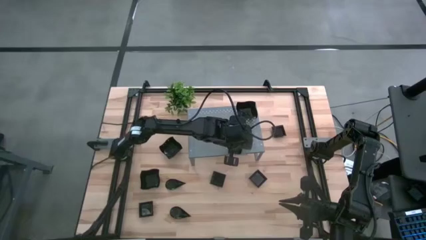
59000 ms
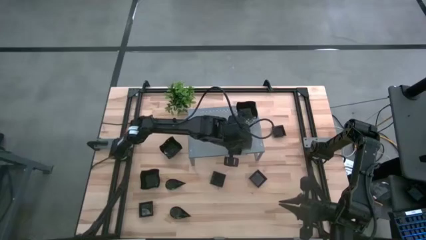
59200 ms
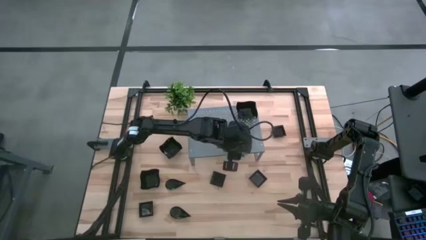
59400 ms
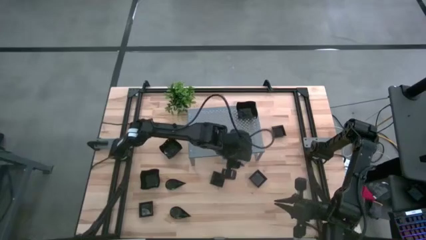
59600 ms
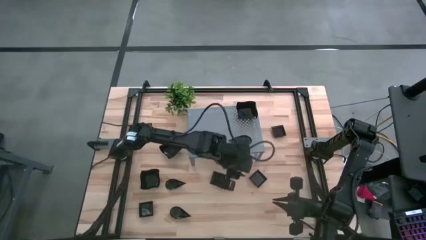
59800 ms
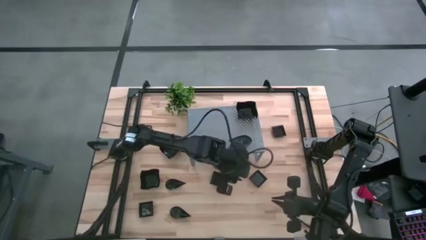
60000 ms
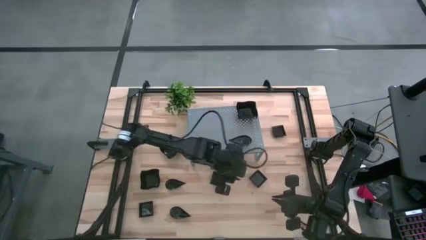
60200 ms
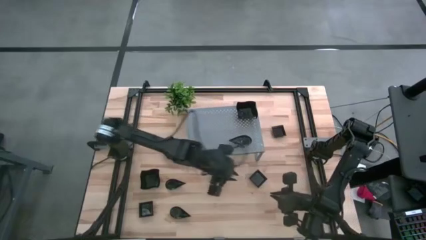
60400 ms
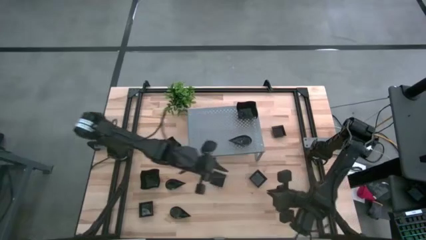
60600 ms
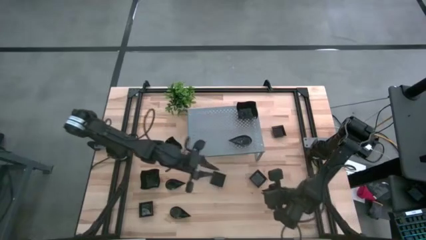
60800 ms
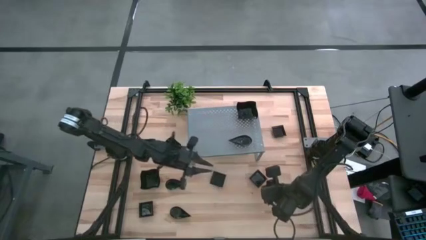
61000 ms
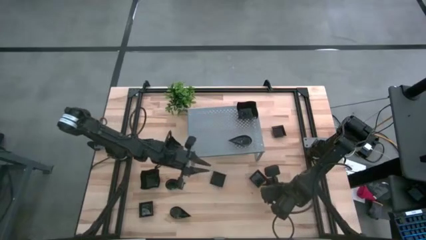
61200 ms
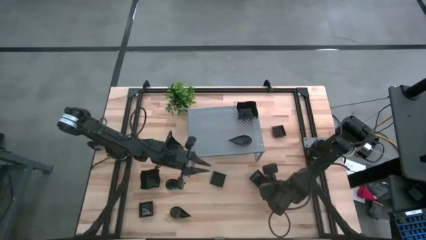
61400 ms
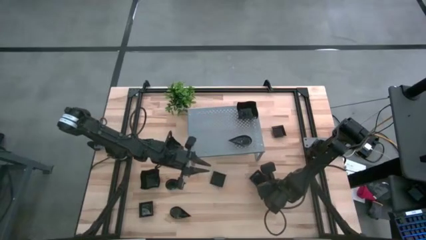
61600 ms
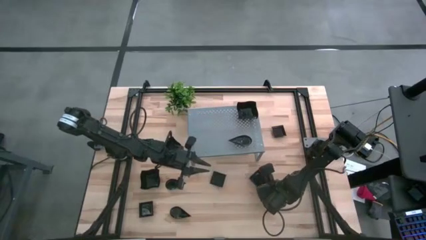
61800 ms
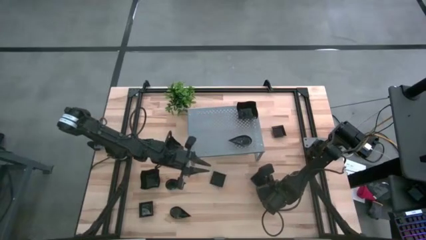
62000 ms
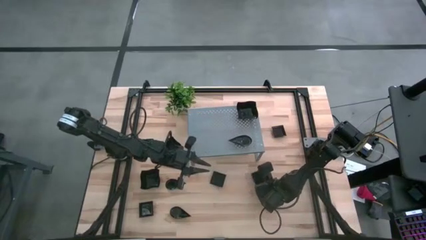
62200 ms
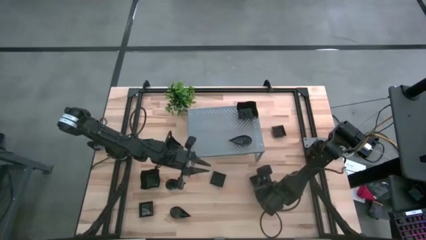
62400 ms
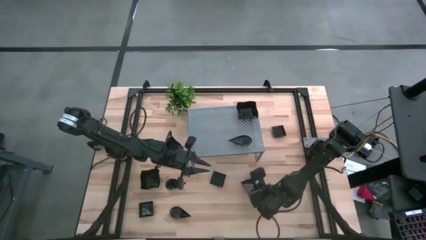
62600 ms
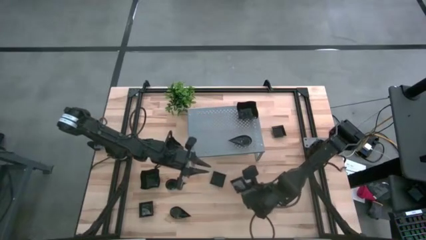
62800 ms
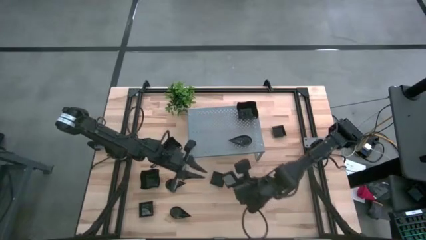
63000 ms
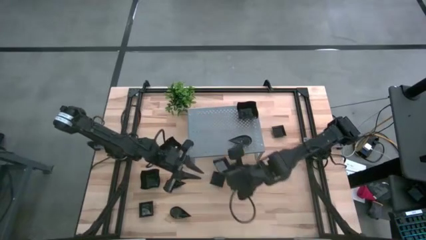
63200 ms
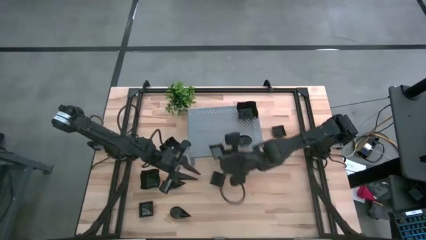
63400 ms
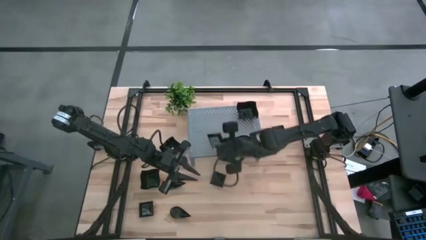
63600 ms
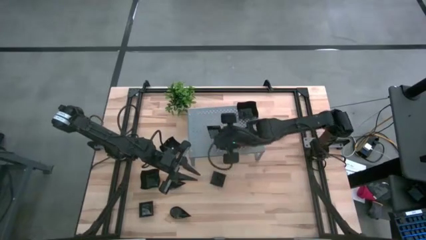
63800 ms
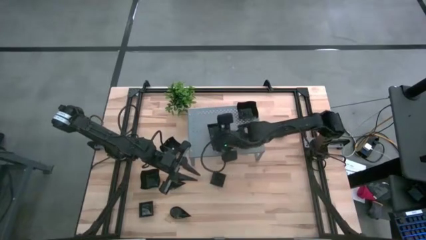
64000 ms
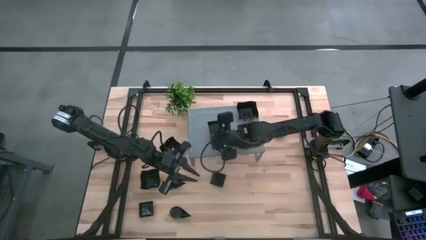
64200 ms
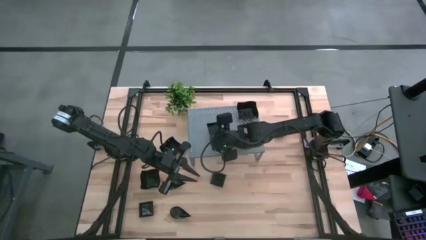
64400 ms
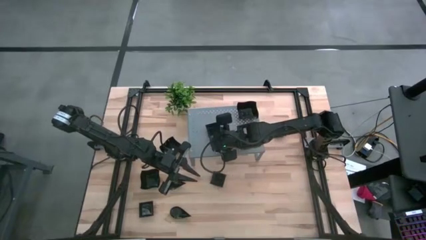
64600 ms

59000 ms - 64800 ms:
Task: Pick & Place Mini shaped plates
Put the black square plate on the shelf

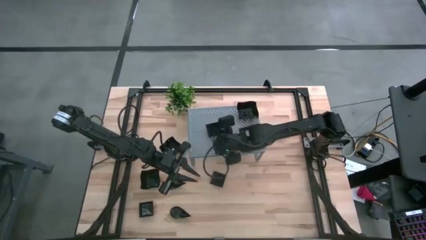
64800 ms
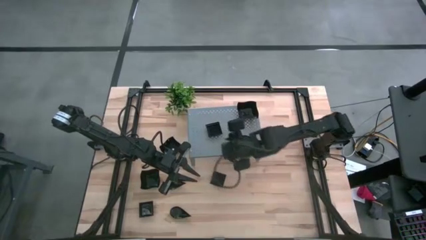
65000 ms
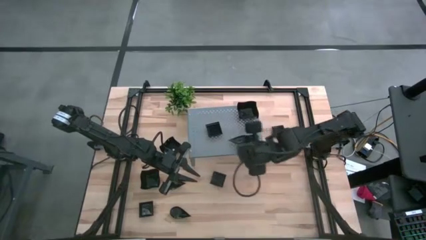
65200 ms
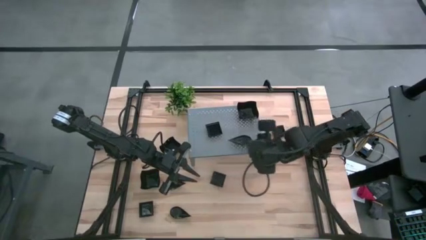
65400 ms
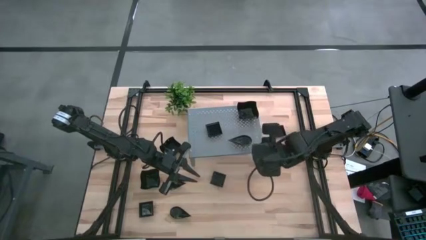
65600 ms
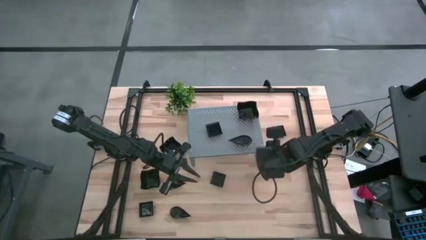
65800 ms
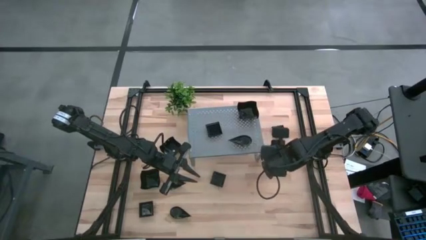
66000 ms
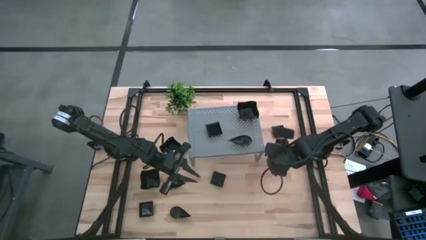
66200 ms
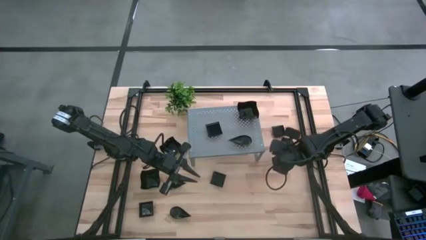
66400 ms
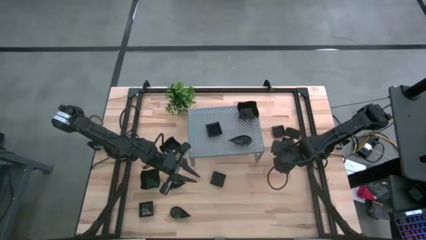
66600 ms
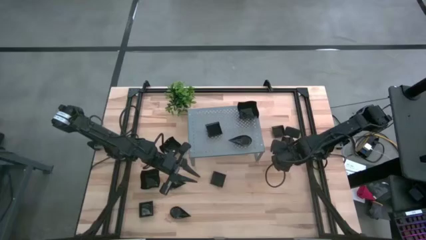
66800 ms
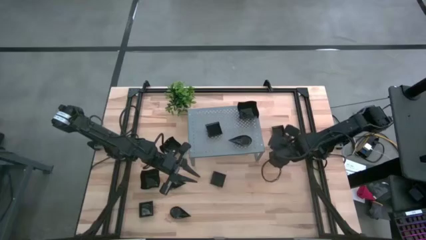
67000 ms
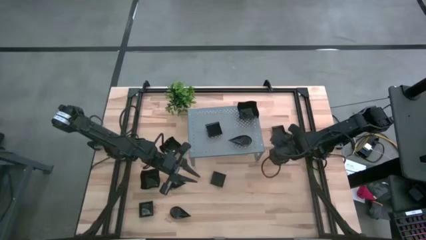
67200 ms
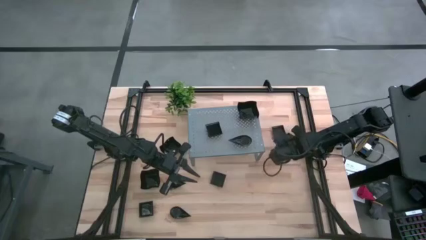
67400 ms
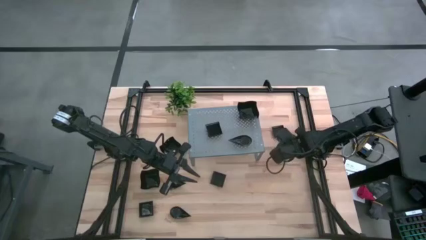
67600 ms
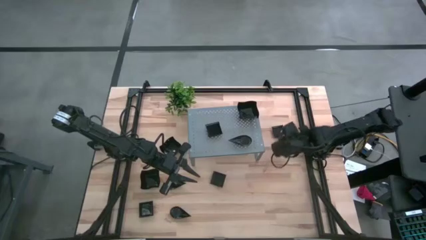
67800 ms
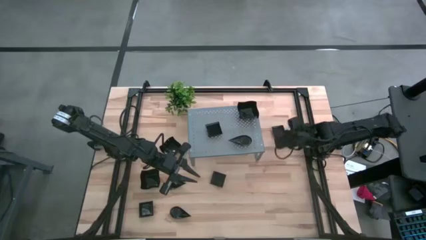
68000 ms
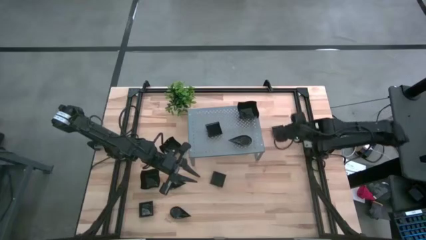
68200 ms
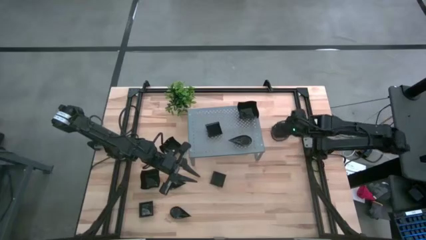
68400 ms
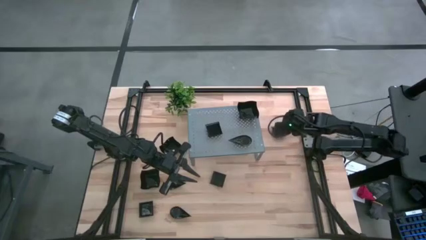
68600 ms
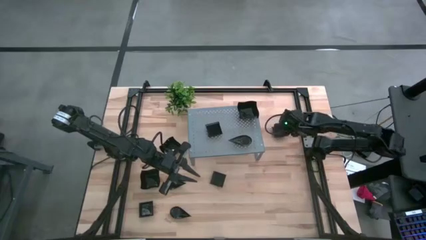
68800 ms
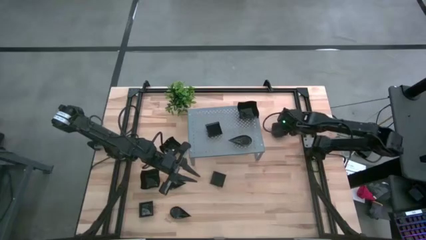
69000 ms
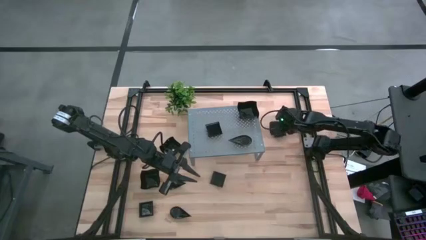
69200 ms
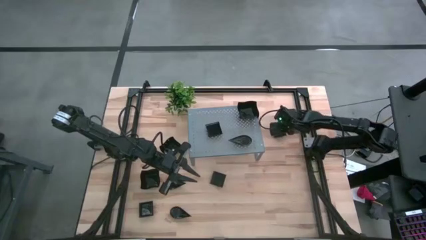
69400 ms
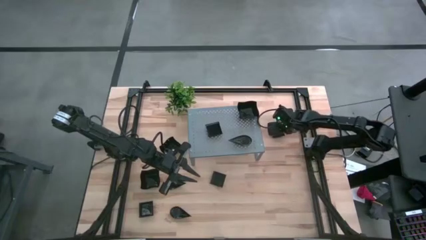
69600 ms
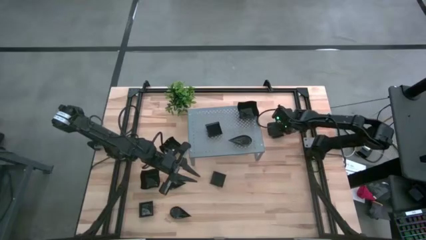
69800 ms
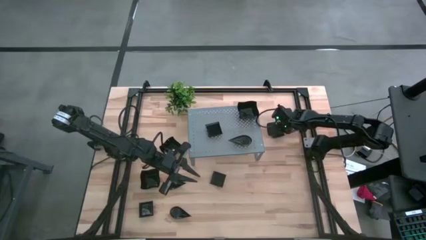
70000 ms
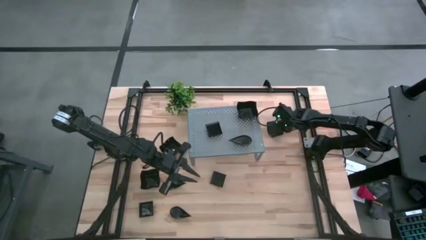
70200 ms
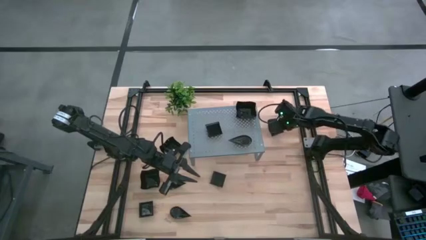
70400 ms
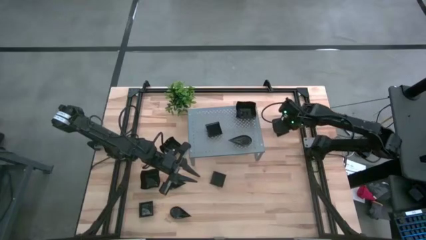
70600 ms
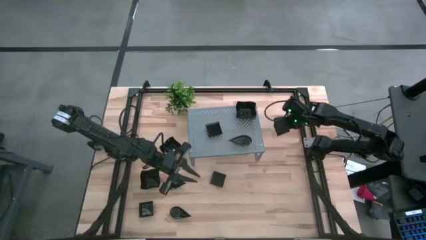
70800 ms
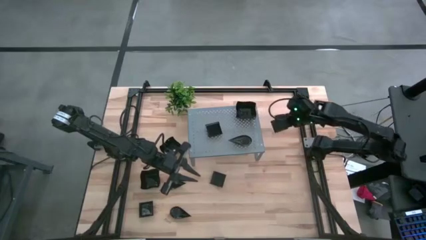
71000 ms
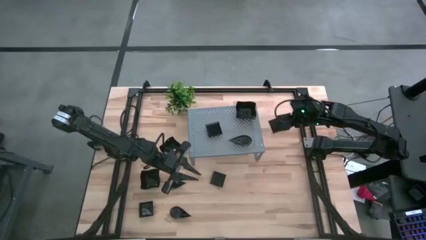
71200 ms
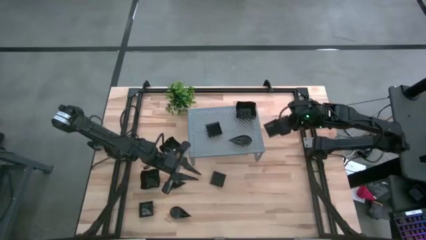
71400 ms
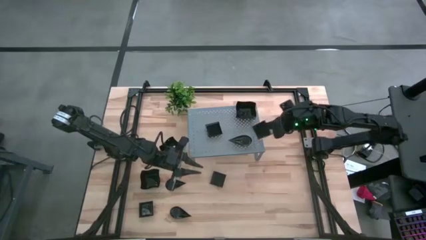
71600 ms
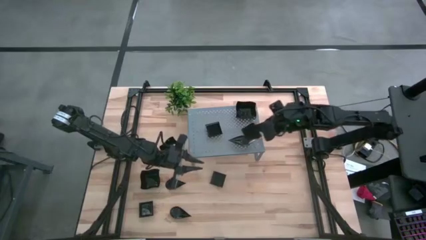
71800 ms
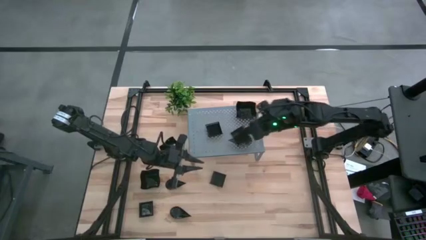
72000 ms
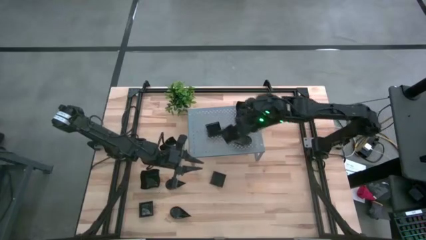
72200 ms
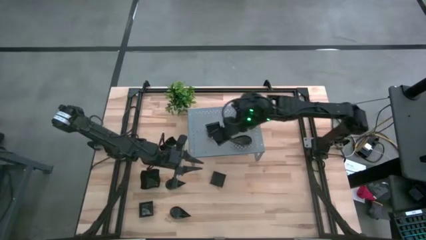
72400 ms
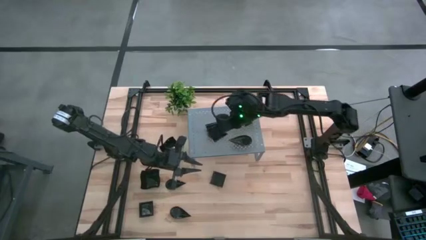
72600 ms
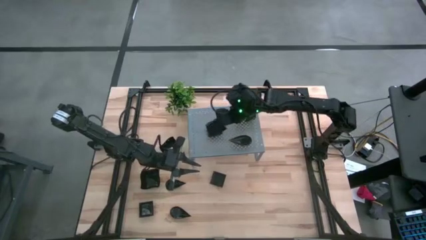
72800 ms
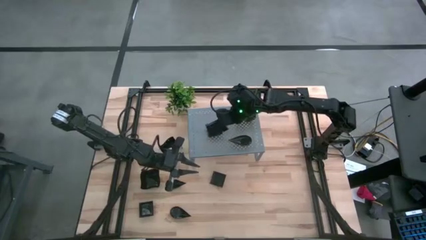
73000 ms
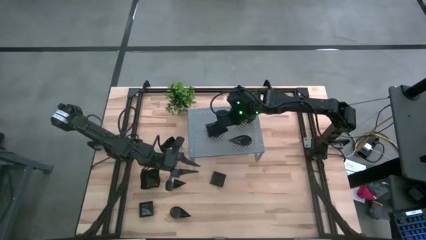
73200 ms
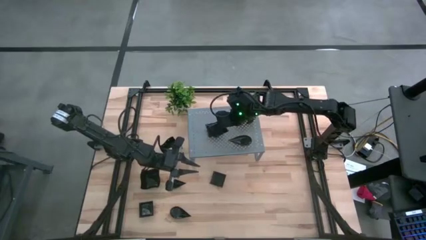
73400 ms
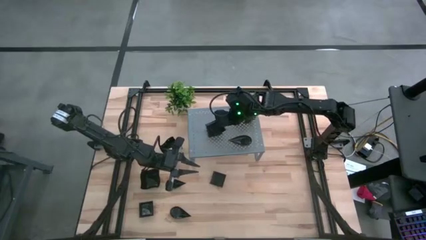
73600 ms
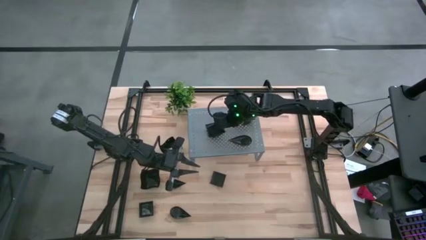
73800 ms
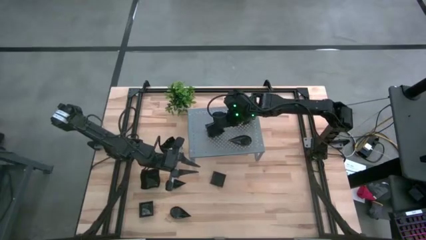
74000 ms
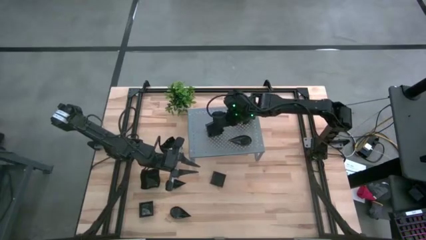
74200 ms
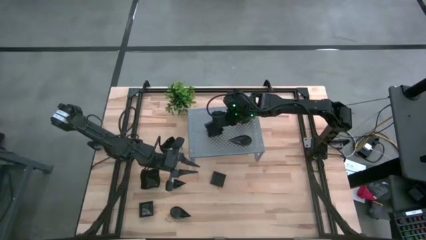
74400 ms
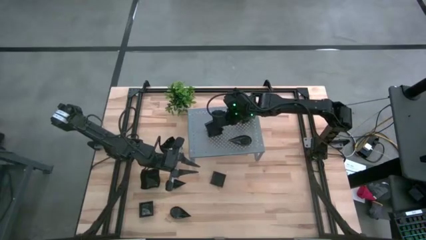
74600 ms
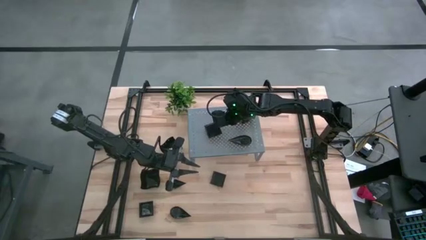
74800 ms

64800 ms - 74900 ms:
Stack the black square plate on top of the black square plate on the shelf

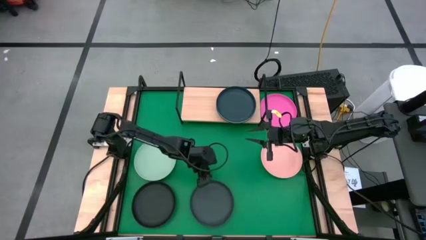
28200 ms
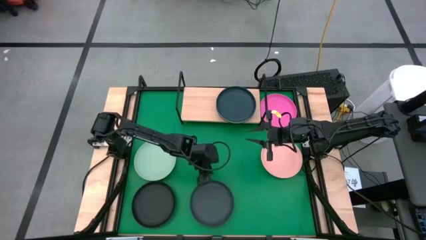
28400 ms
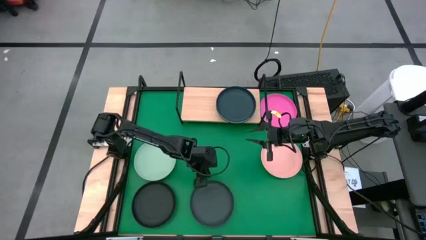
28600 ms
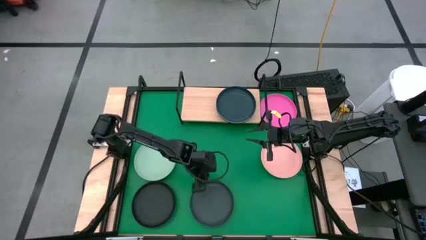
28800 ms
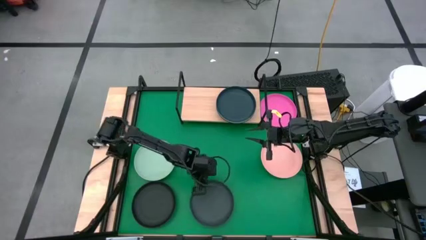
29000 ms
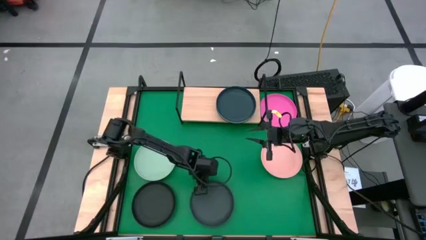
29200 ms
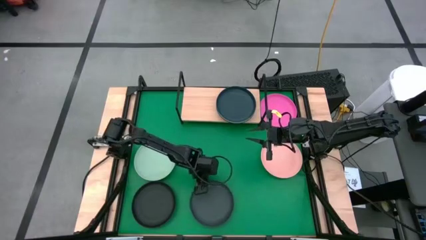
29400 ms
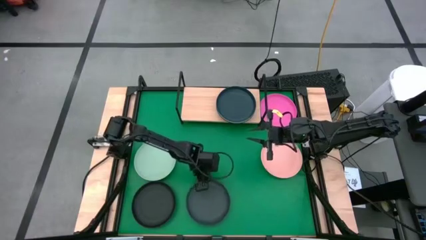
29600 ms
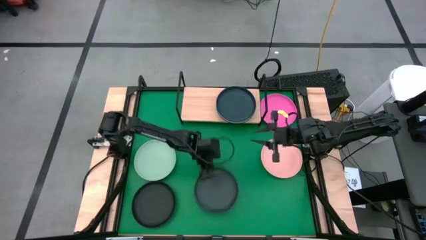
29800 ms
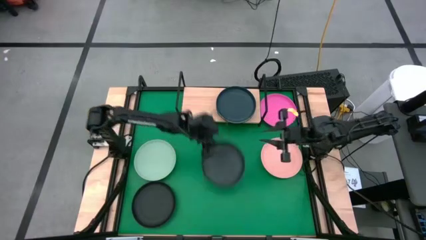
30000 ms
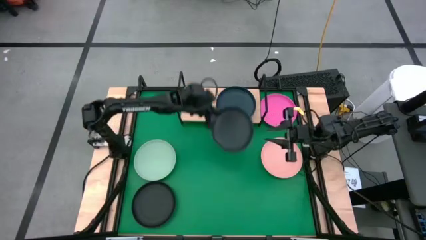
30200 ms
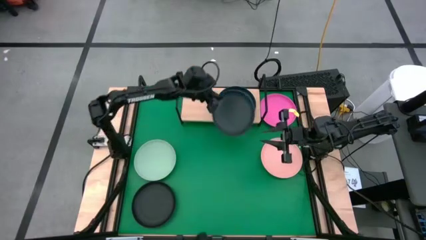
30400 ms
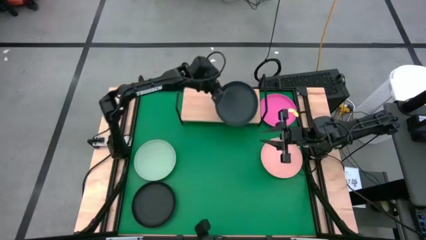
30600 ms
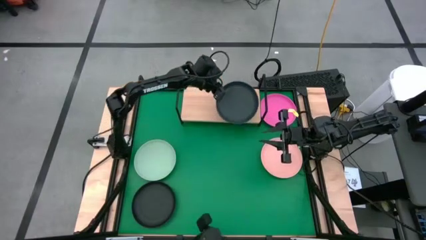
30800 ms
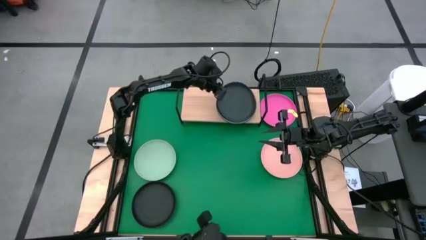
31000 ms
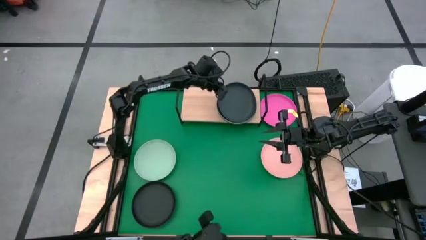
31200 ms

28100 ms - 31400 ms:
Task: Place and stack plates onto a shelf
Stack the right black plate on top of the blue plate on the shelf
